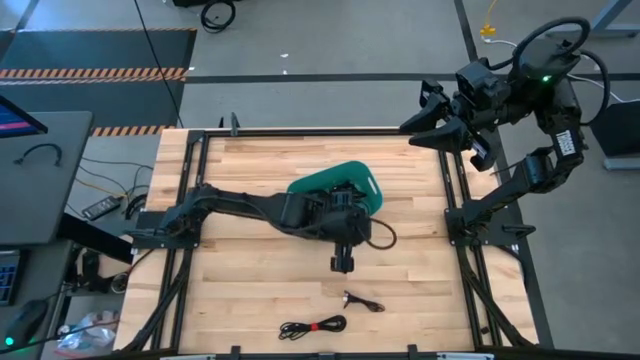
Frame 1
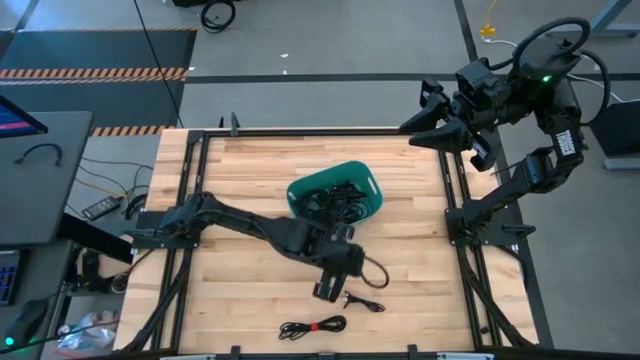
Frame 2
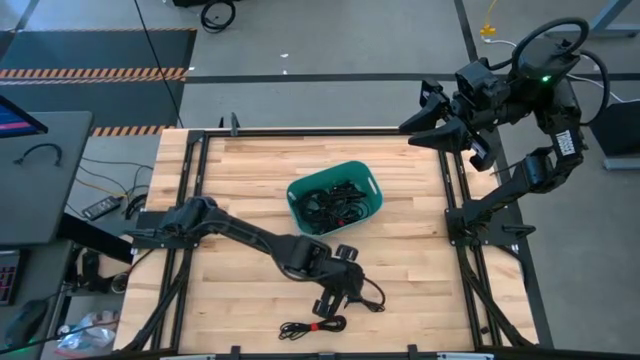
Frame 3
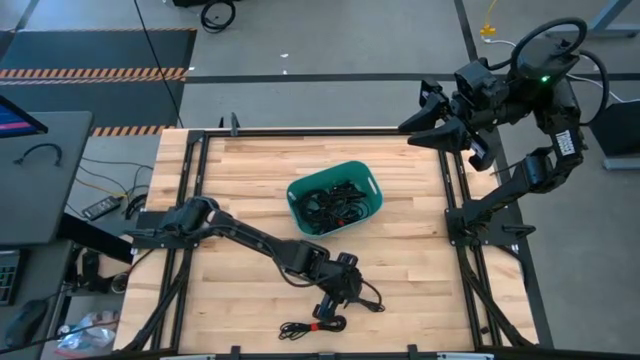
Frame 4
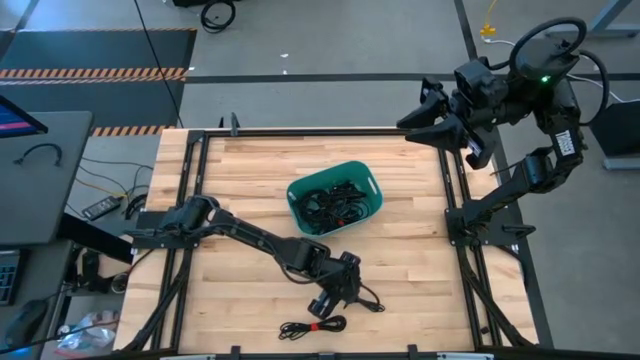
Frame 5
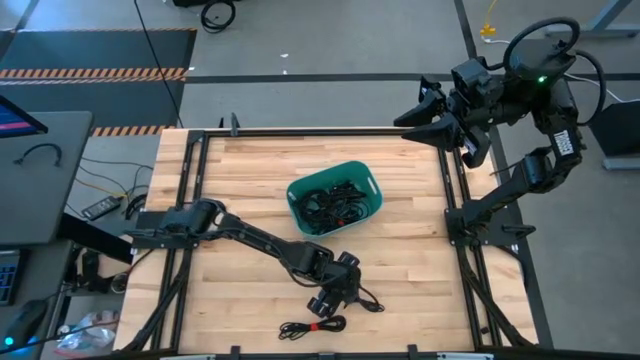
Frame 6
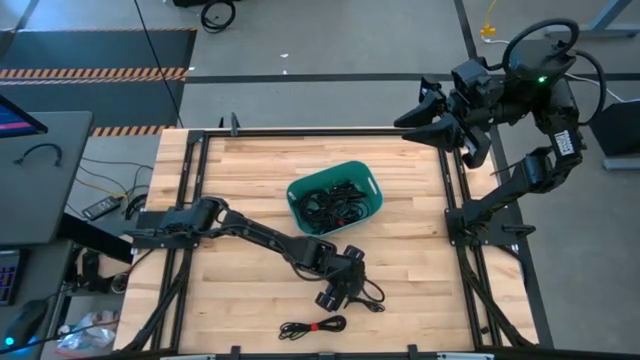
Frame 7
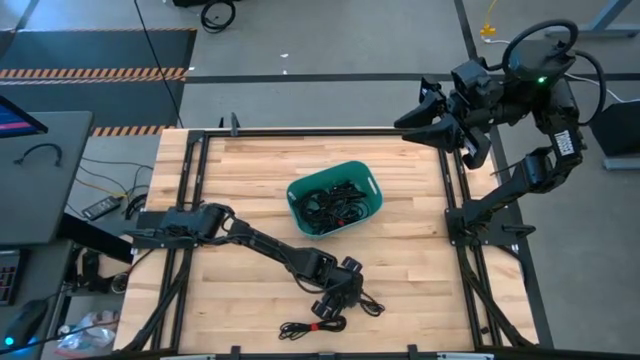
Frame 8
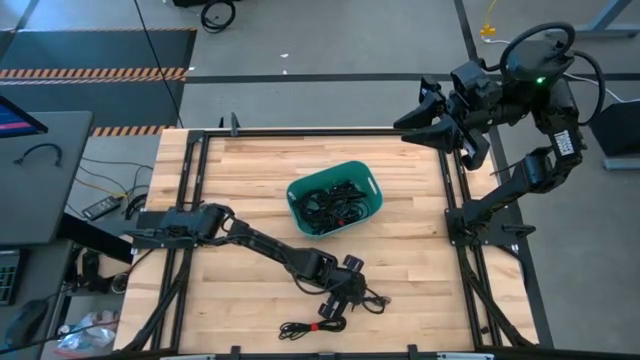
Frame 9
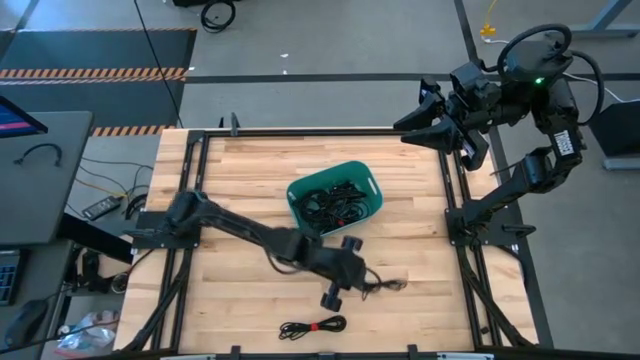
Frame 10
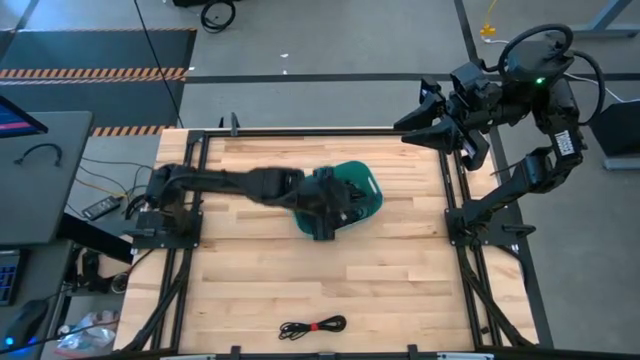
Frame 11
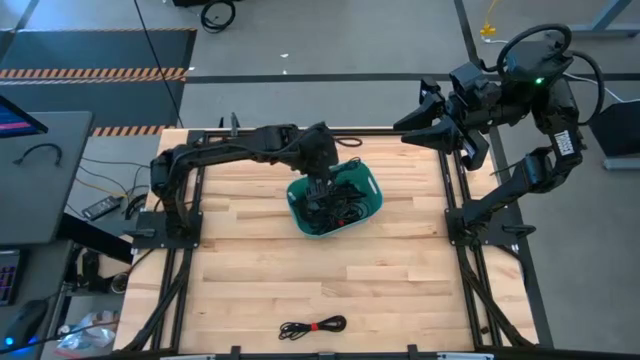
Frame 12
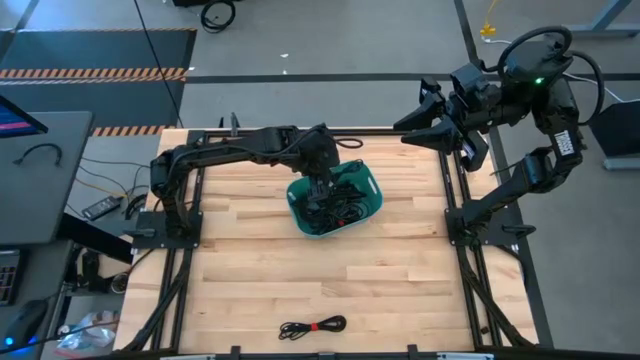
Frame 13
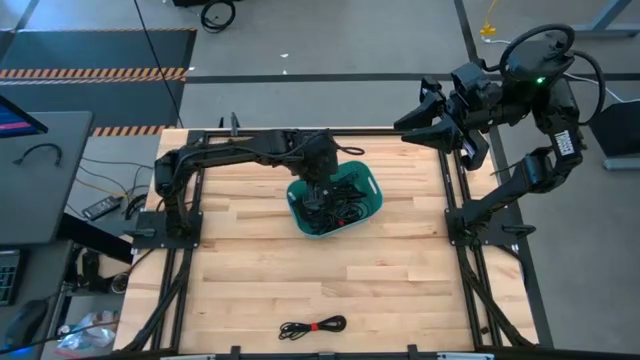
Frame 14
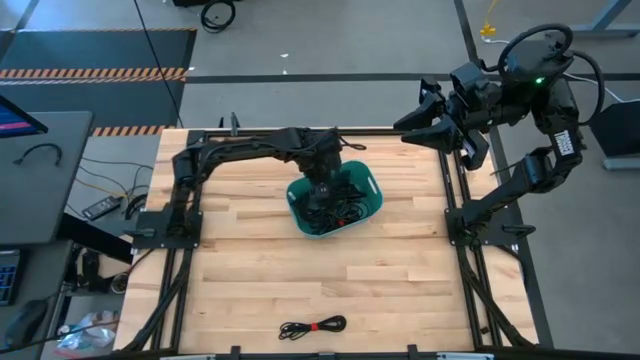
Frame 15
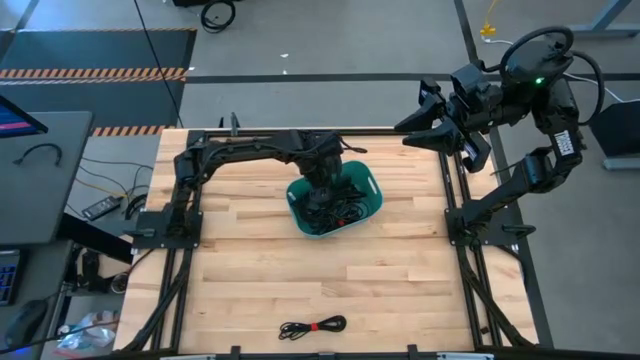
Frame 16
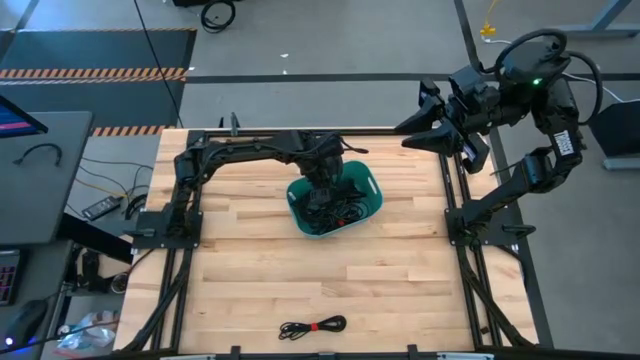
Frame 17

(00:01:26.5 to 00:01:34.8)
Task: Pick and place USB-C Cables
Put the black charger cable into the green bin

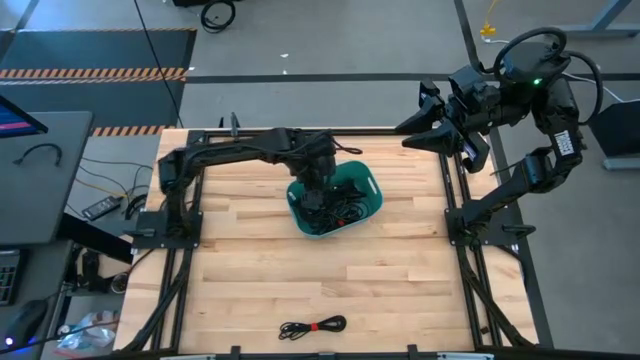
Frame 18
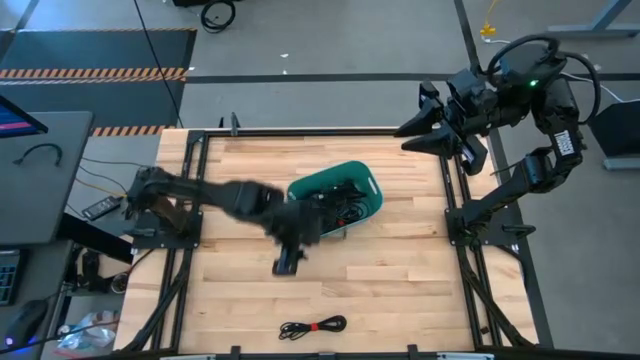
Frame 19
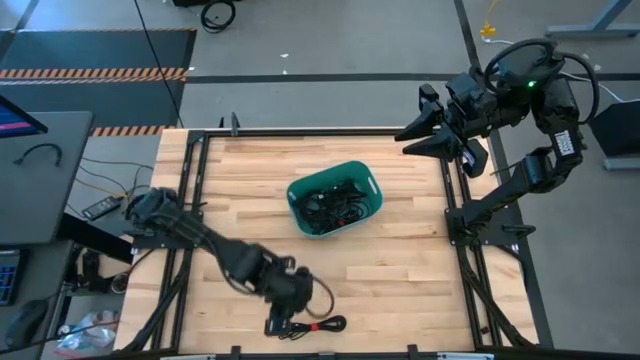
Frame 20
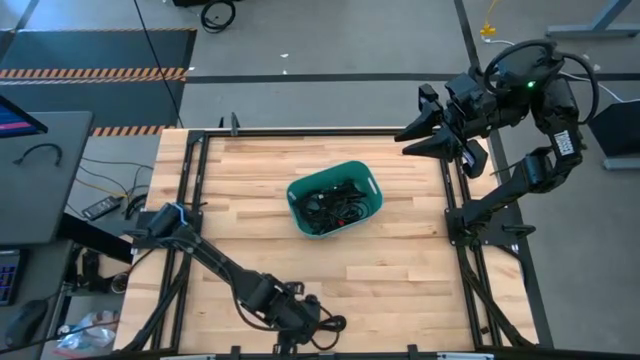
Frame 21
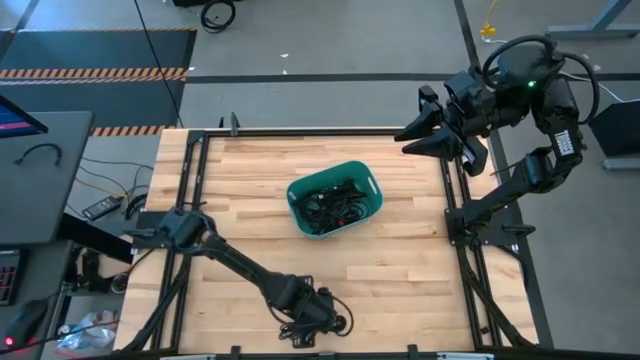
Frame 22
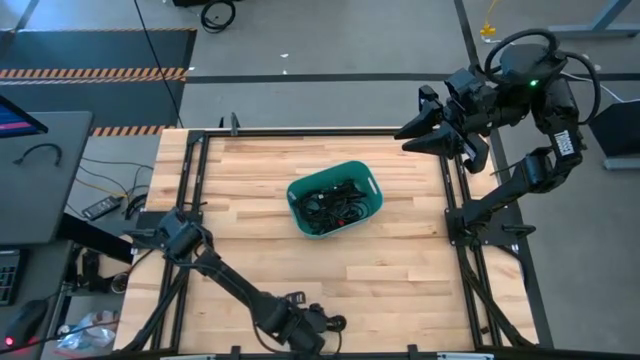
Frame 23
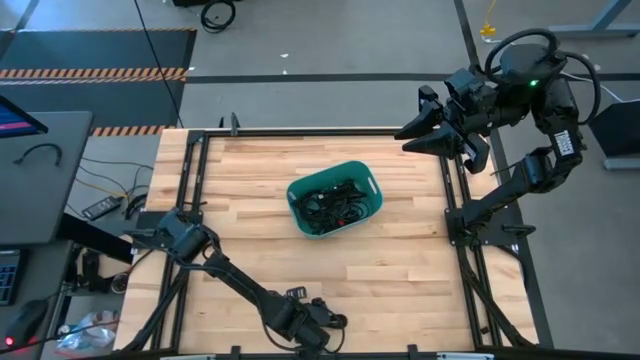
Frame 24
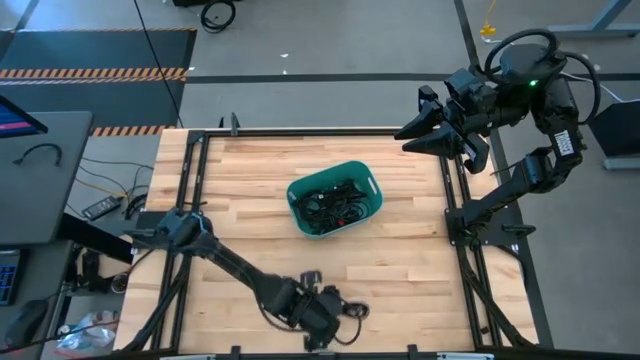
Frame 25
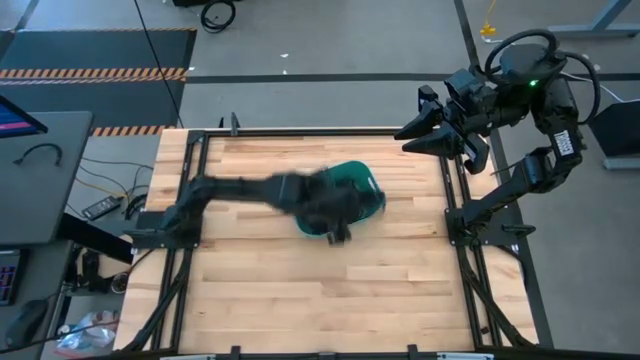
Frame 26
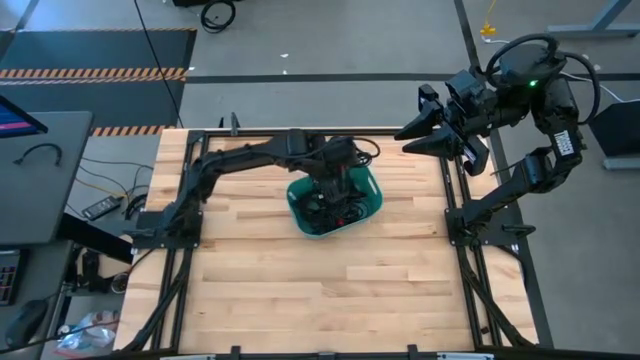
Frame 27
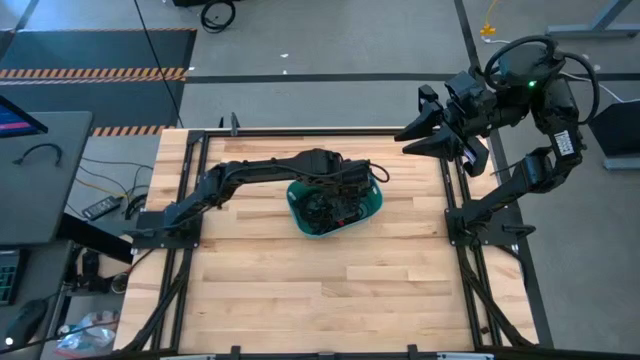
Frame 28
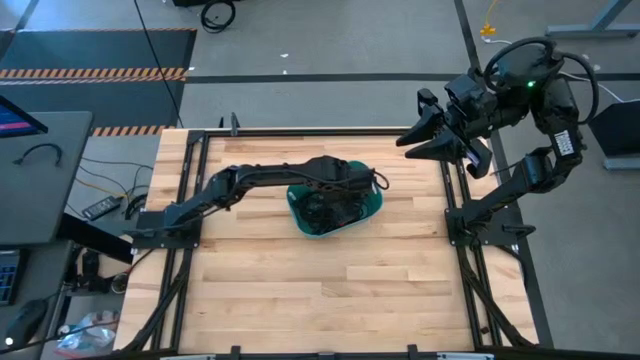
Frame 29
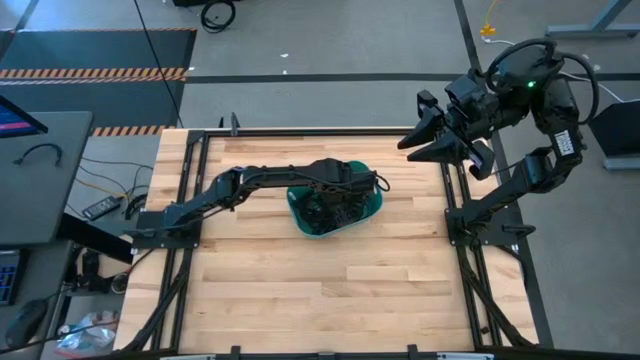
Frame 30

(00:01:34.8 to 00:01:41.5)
Put the black charger cable into the green bin

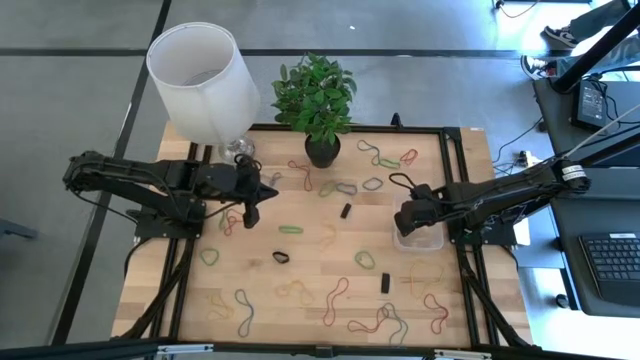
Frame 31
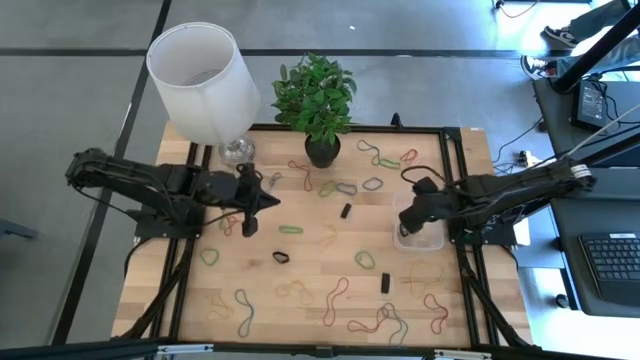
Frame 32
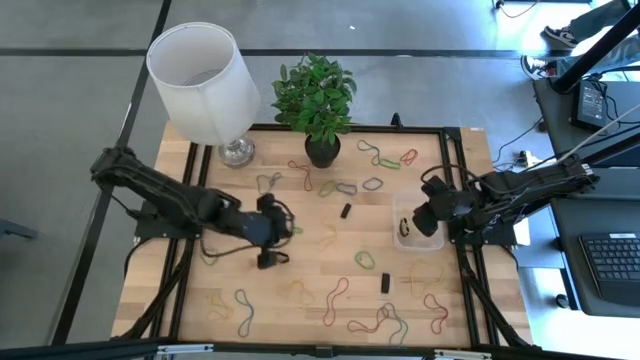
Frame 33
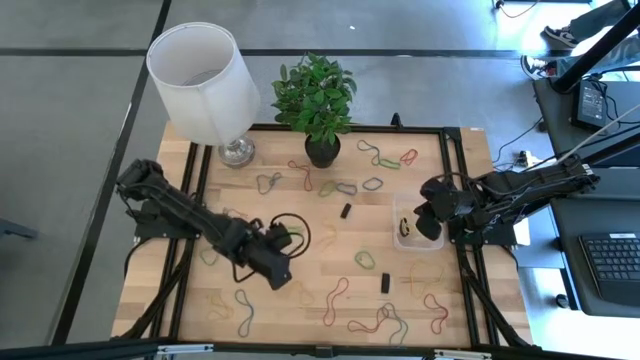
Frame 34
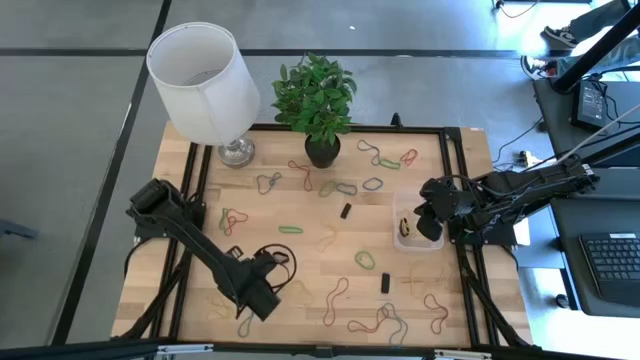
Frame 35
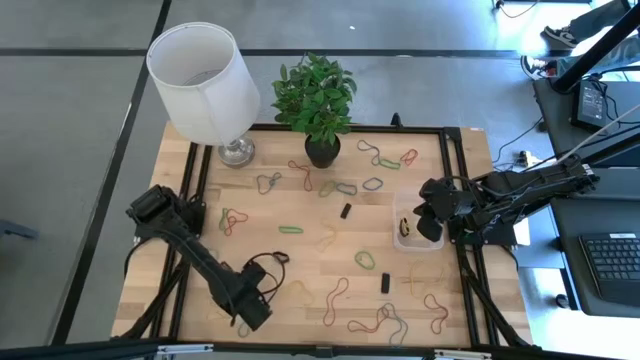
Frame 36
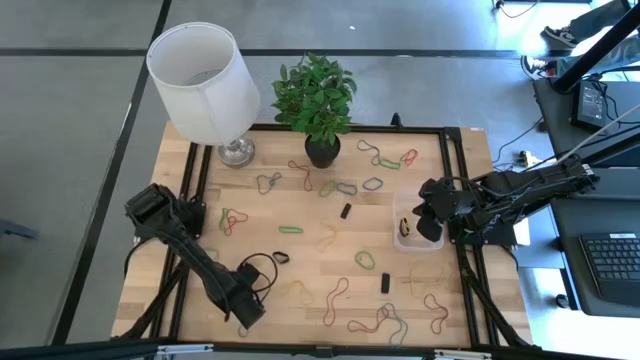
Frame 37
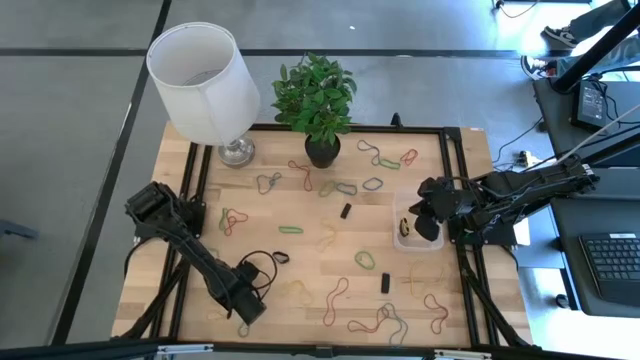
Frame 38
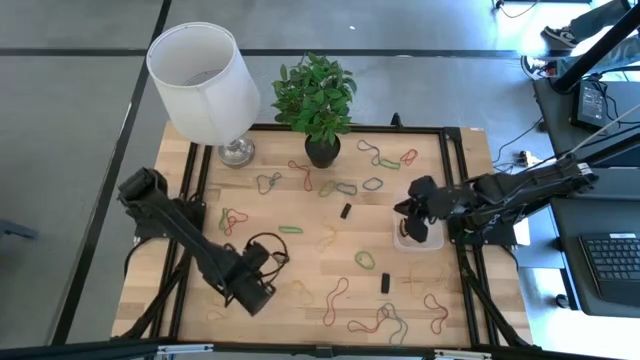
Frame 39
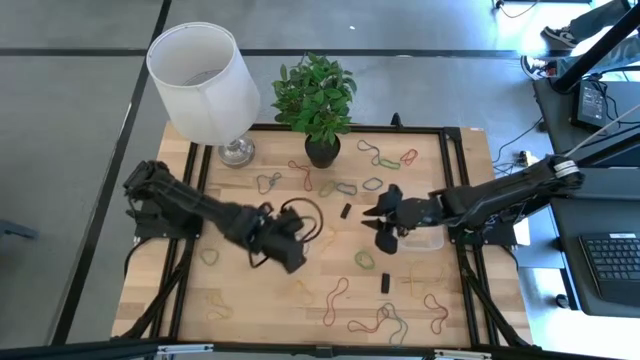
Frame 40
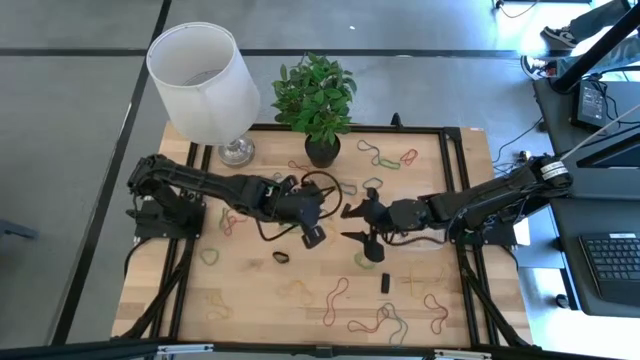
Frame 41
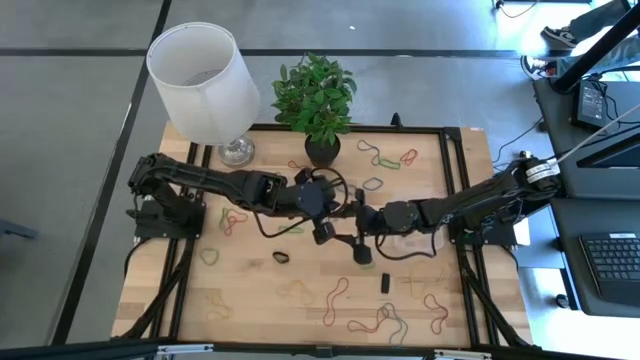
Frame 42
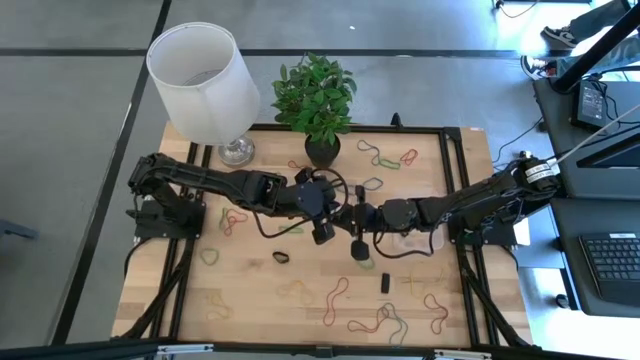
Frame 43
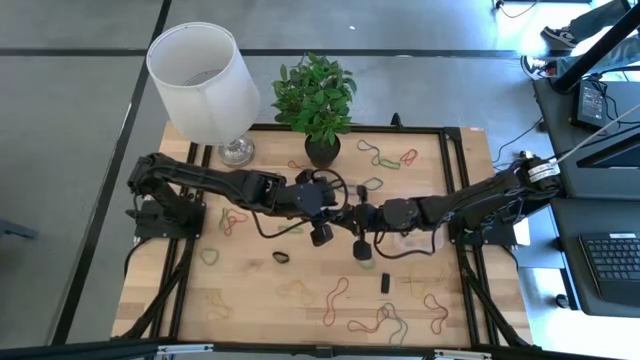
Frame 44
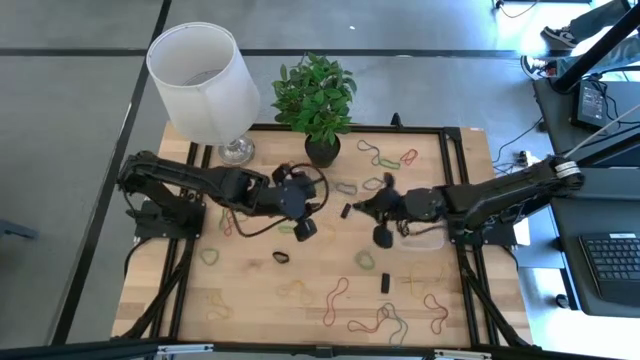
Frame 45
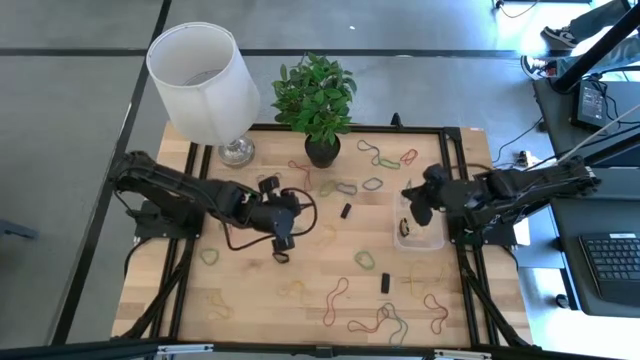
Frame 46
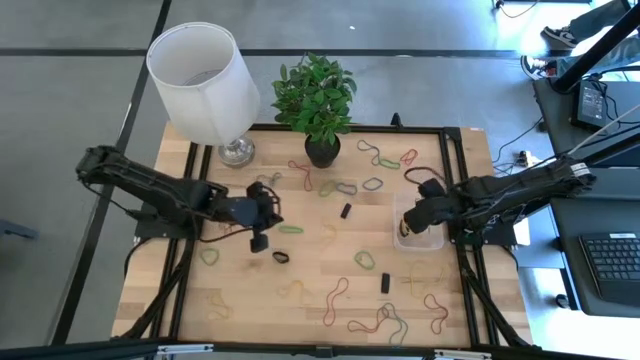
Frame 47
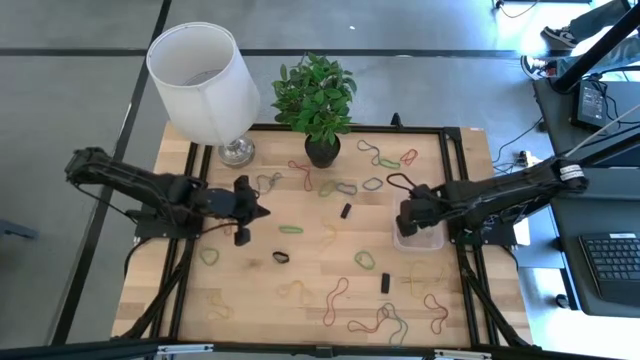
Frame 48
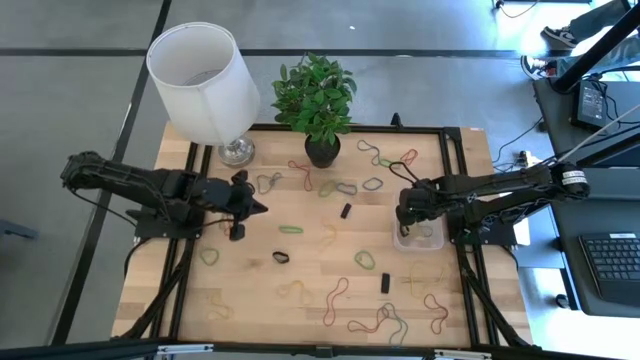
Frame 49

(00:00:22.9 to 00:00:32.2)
Task: Pick and place rubber bands into bin
Put the blue rubber band into the transparent bin
